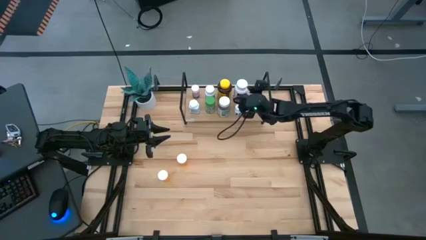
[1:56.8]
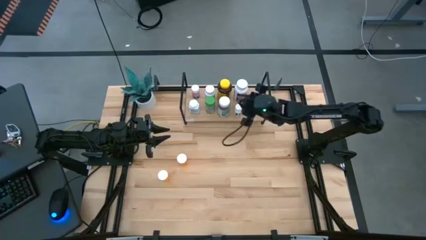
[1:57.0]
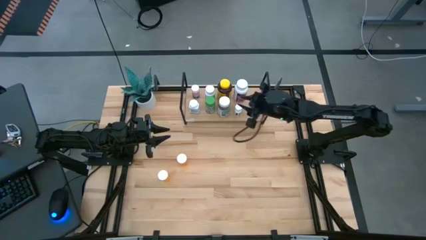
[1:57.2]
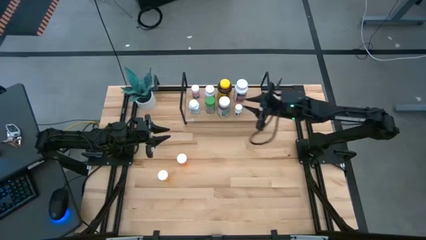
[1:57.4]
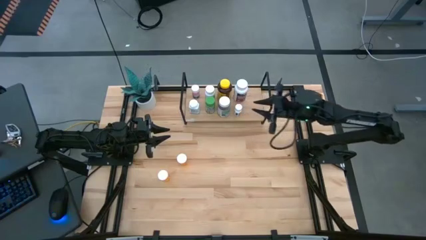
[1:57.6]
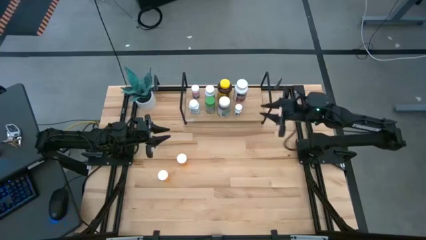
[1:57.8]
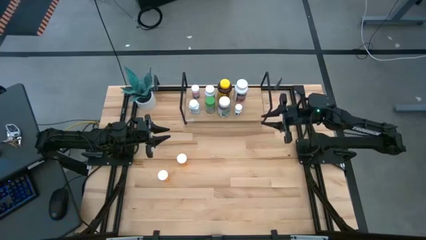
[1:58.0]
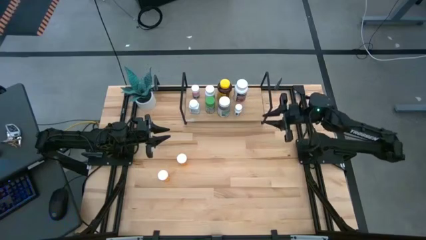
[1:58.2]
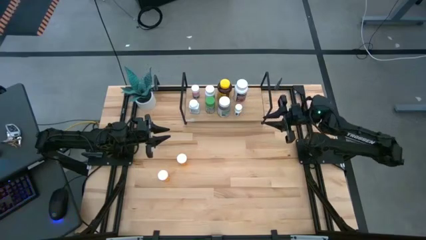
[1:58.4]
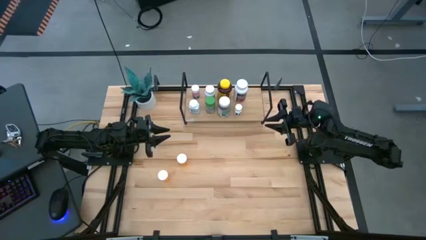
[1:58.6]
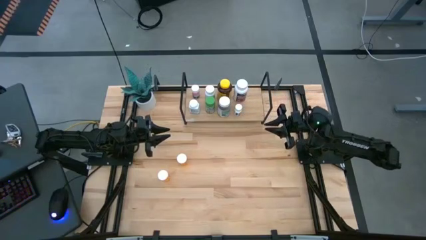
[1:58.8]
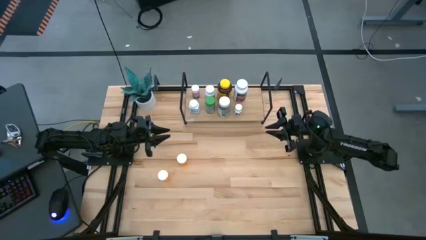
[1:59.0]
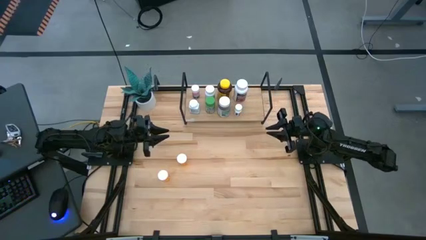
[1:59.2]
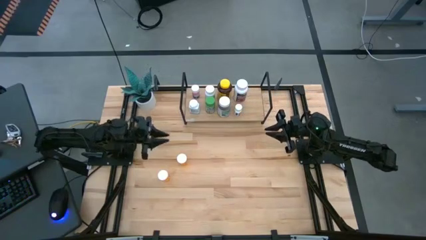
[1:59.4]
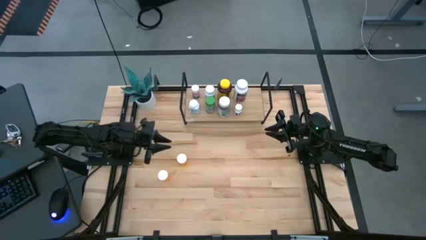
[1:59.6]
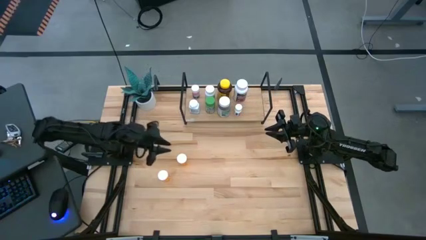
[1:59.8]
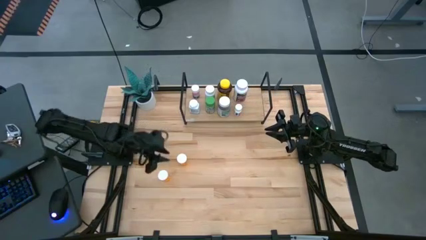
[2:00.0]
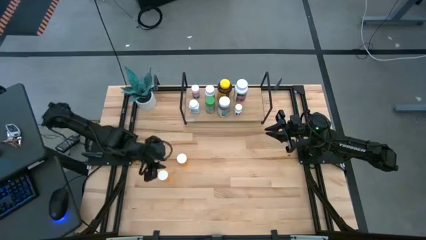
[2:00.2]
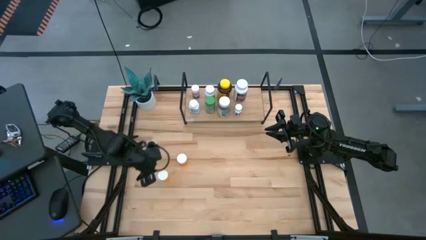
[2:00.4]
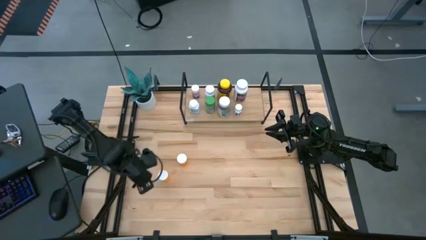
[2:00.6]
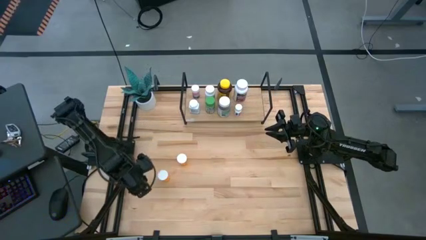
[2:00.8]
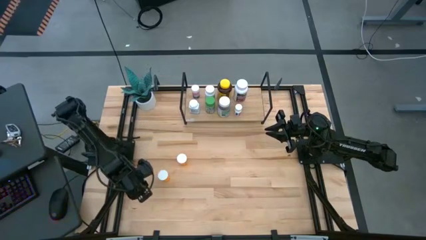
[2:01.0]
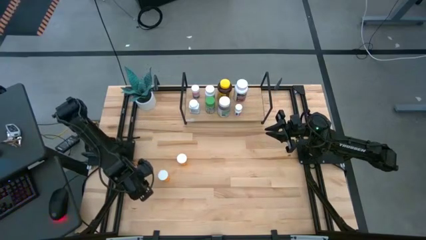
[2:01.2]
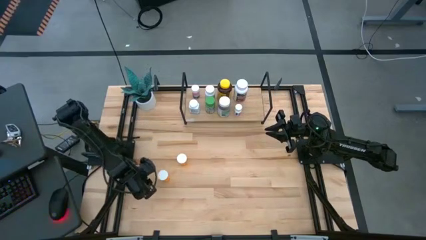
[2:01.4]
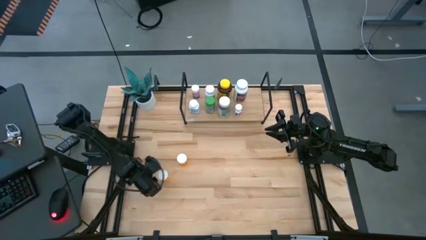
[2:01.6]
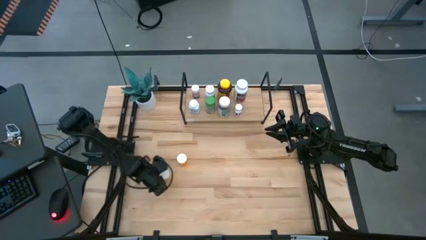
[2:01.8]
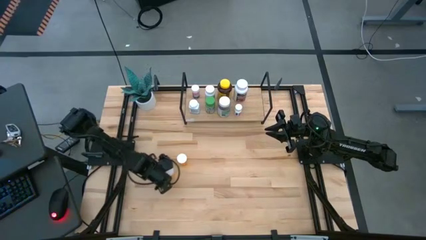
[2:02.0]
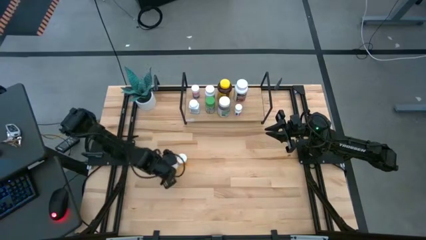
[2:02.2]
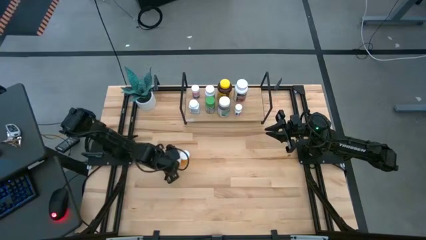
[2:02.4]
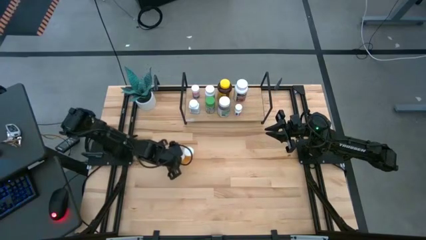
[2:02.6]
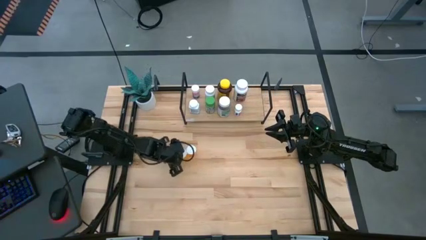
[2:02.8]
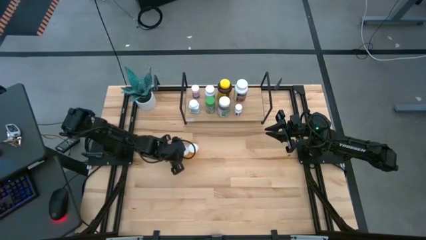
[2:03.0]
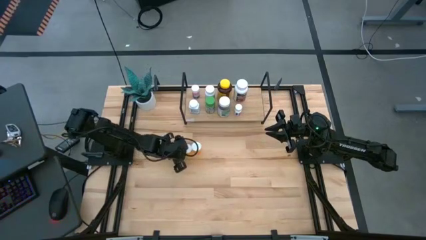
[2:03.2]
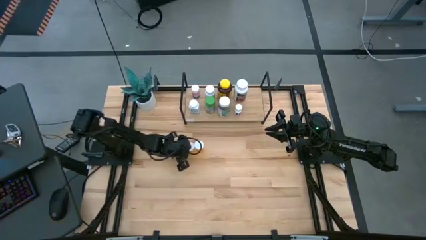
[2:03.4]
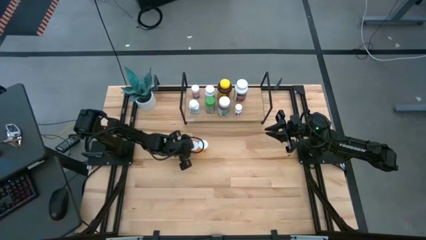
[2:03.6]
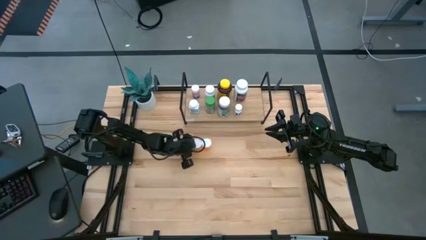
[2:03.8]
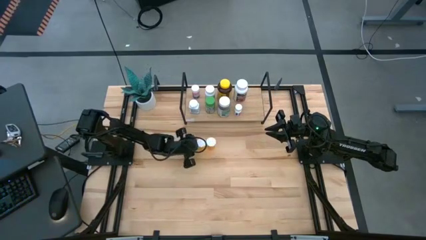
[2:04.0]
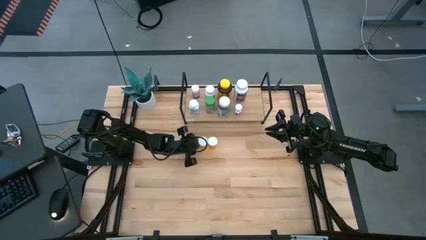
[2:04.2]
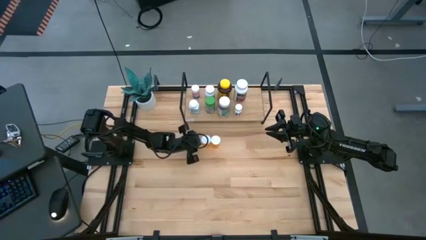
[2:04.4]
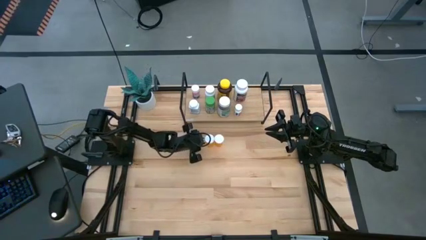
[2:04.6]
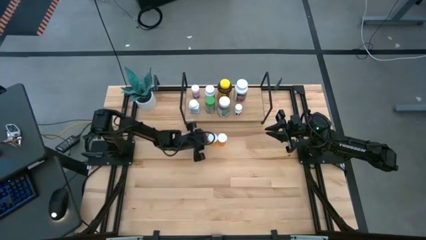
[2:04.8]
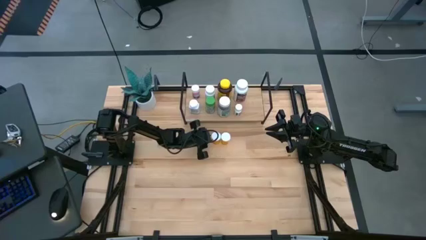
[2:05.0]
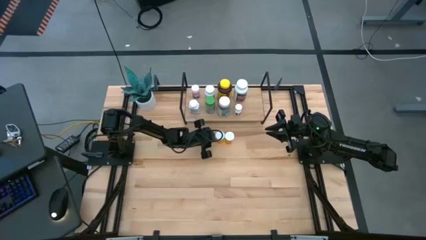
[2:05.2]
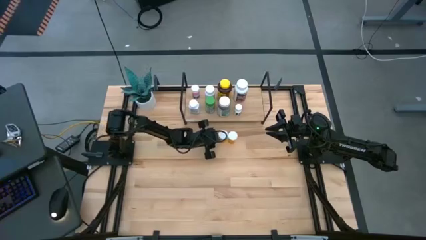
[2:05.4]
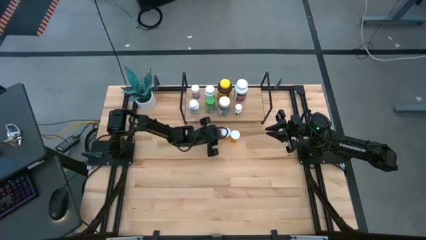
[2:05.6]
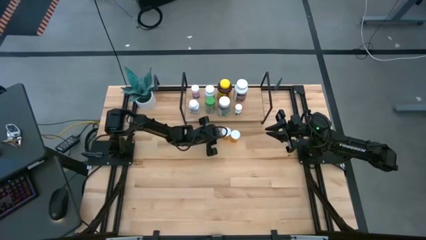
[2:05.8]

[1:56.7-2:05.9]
Task: Pick and place medicine bottles onto shelf by color
Move the orange pill bottles to the top center of the table

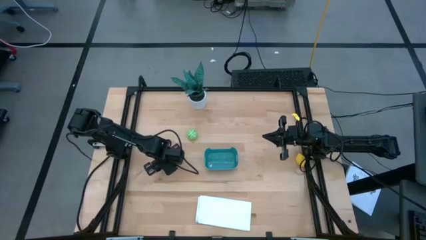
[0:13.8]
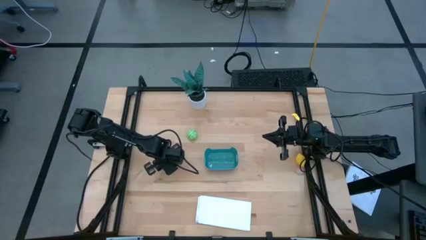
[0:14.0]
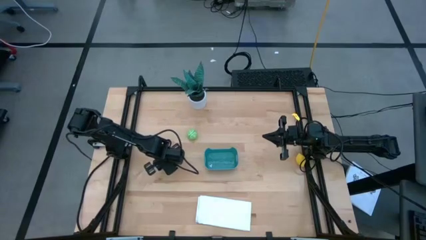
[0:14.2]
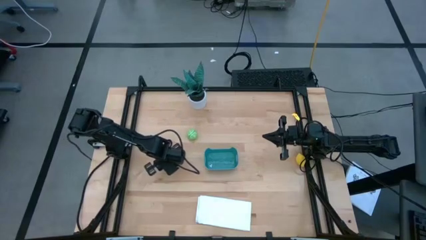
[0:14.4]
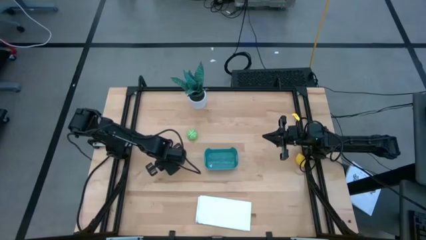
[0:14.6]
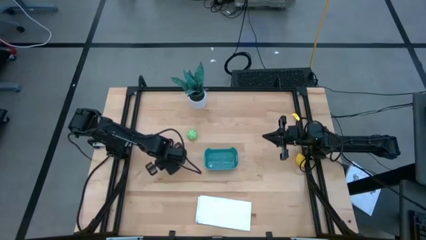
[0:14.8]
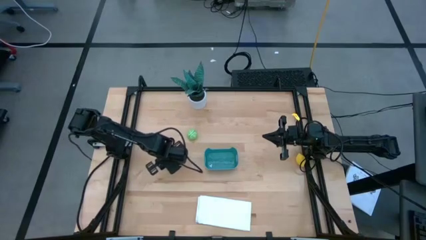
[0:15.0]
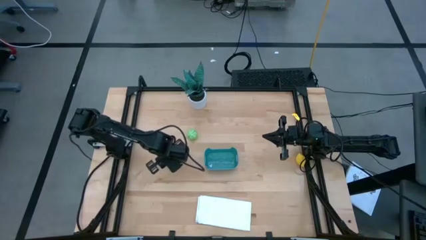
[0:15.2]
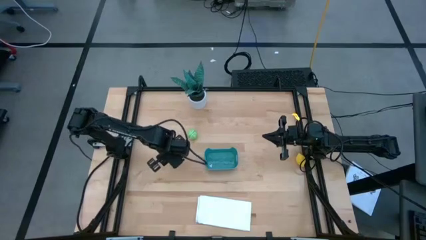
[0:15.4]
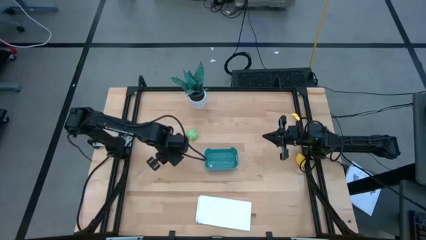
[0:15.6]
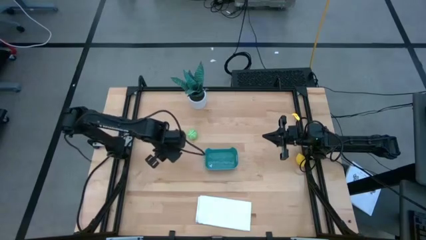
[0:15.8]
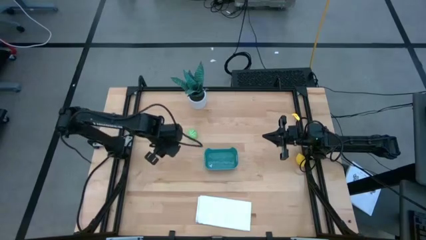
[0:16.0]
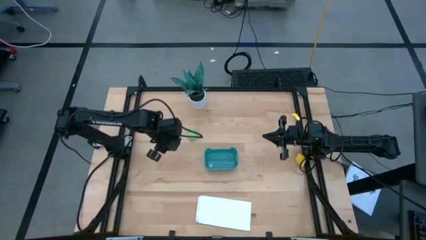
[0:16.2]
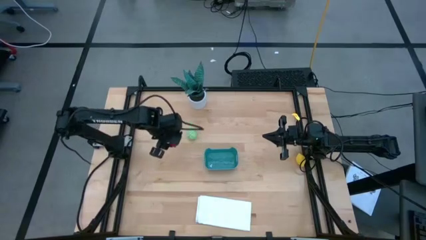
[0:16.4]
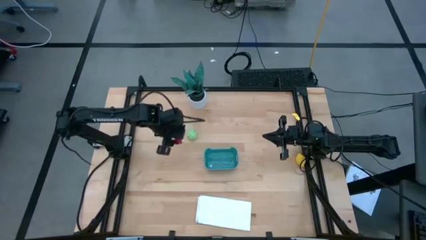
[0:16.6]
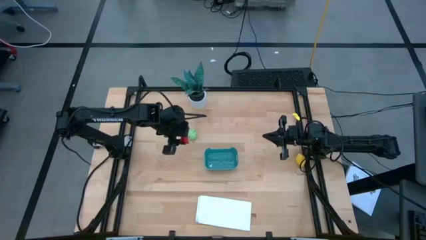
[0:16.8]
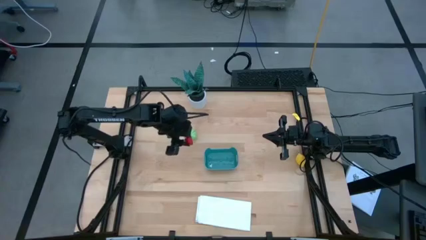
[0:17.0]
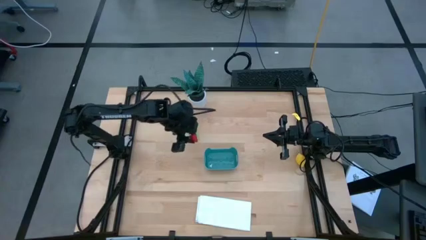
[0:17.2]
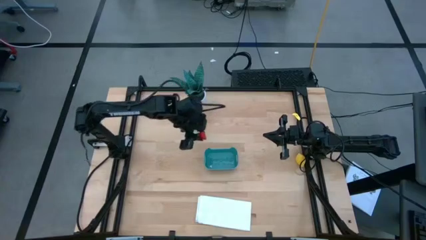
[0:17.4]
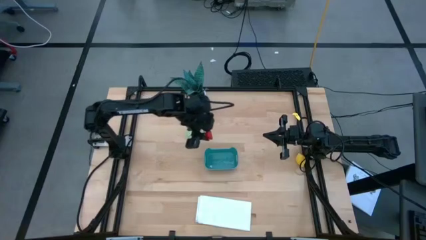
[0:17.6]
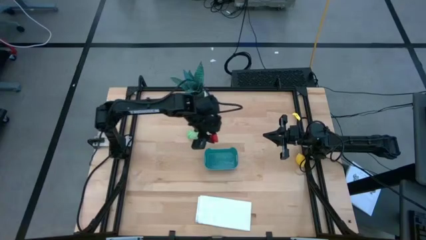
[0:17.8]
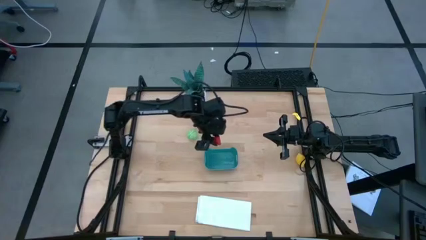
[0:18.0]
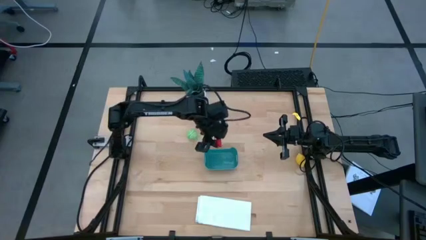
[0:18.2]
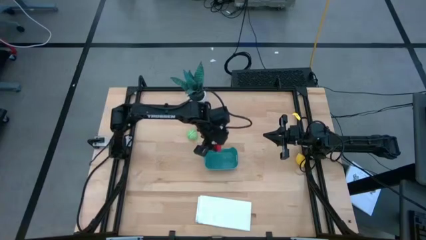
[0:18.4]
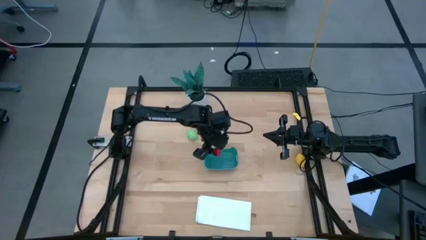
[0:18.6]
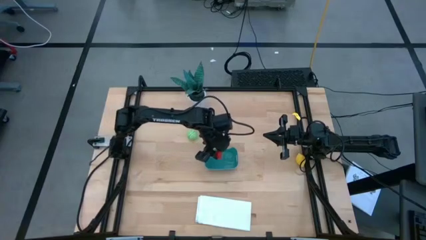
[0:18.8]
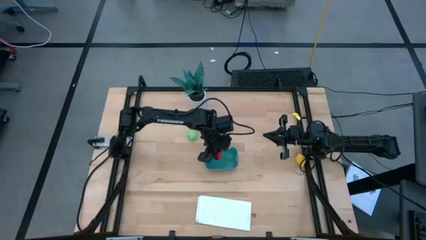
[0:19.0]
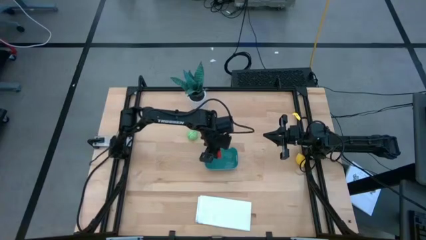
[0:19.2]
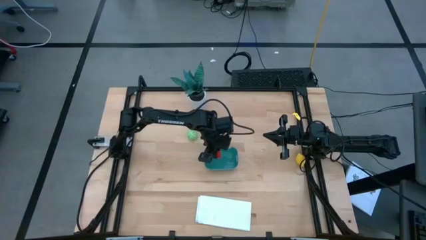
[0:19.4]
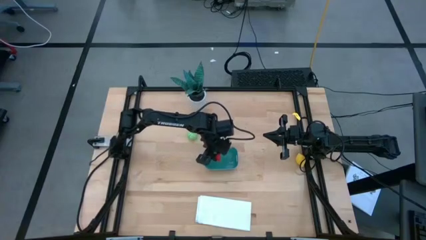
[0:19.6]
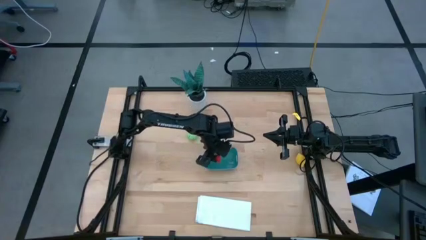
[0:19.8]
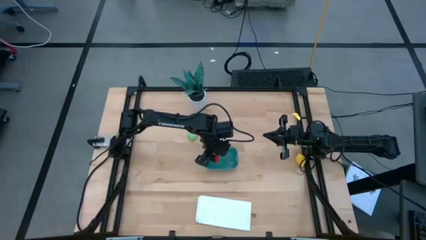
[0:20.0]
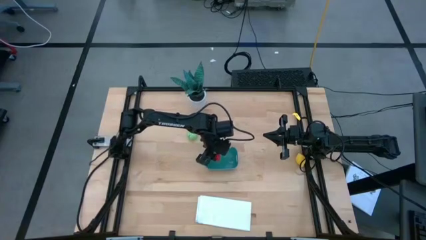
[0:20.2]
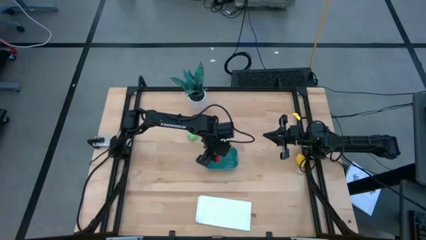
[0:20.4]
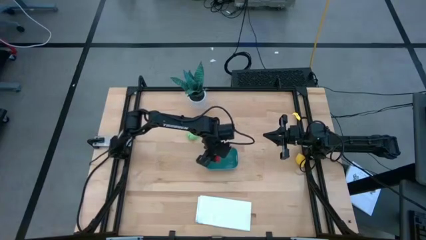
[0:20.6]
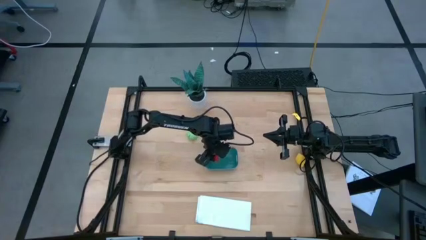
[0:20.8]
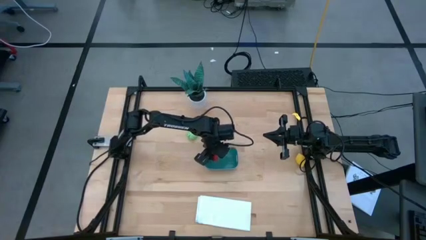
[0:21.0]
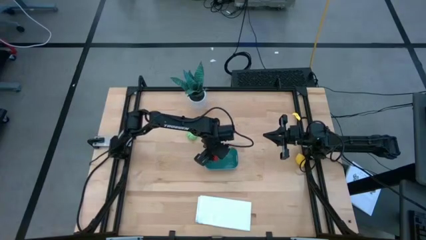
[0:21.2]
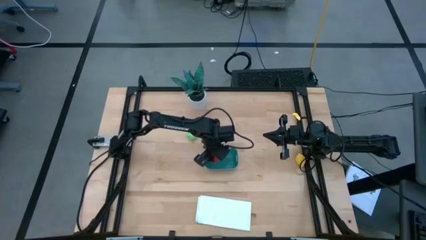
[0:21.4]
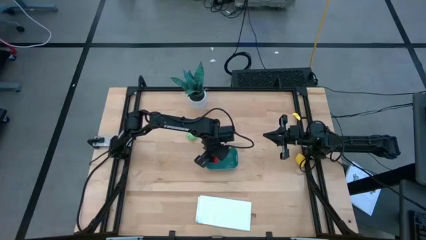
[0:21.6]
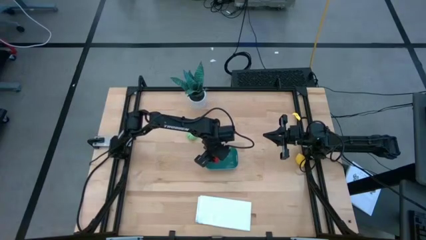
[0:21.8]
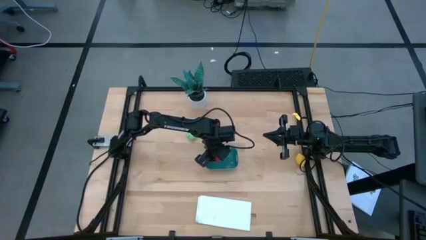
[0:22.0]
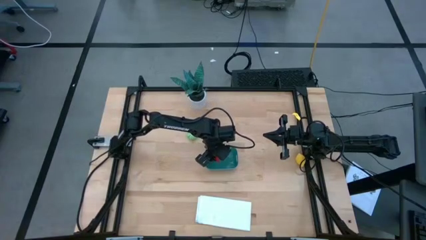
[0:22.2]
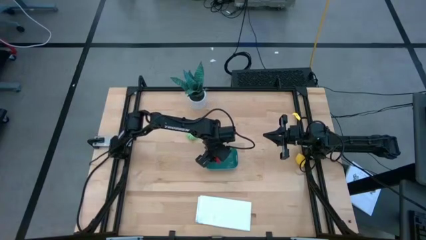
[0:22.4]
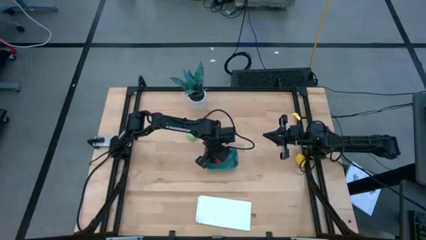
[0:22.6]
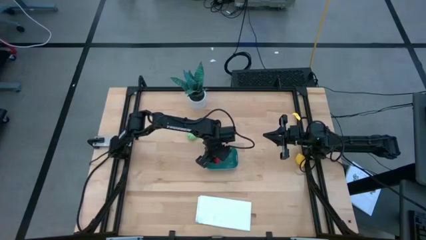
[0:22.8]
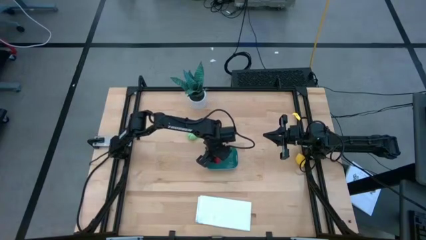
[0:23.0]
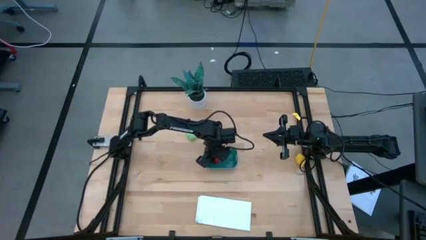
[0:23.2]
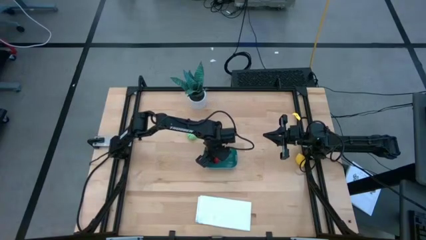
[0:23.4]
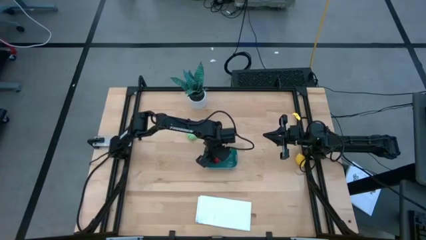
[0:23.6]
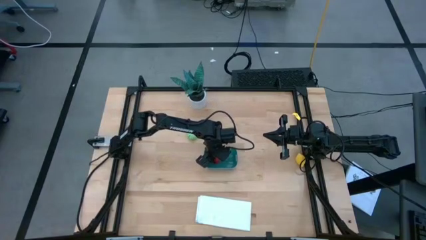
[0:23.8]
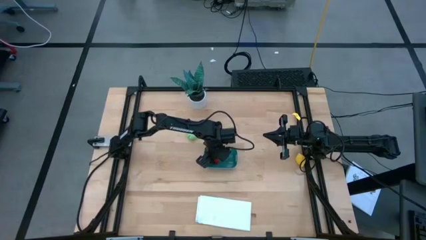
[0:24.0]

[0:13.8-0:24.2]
Task: Pick and placing Produce into tupperware
Put the red strawberry into the blue container
